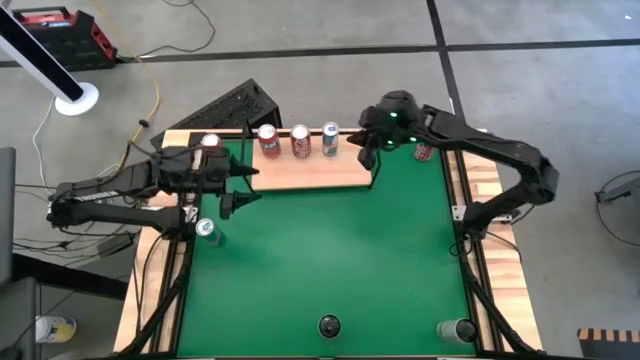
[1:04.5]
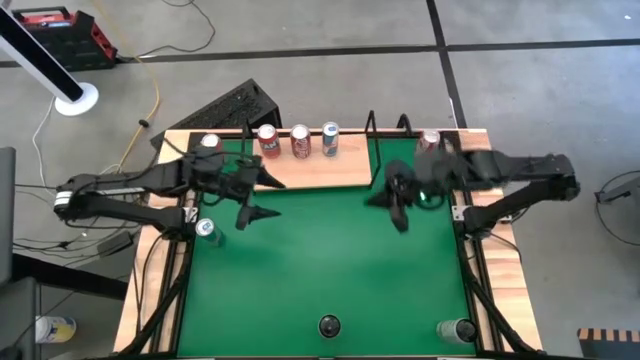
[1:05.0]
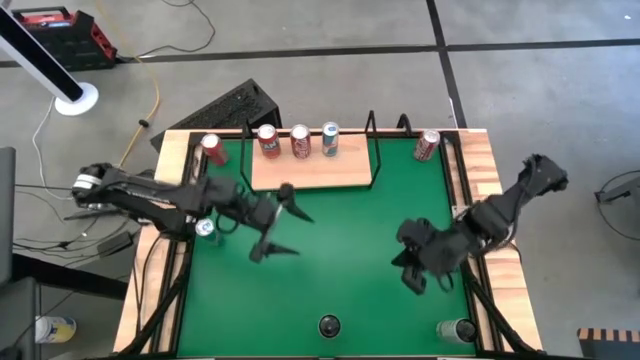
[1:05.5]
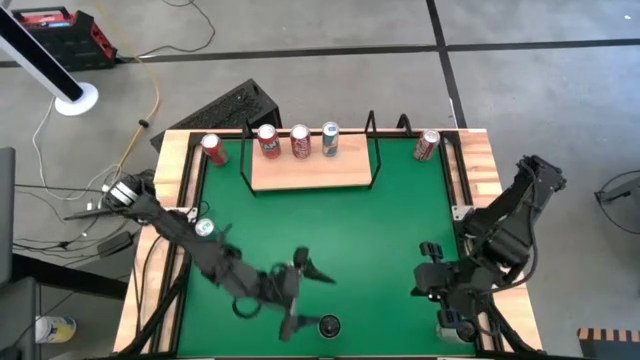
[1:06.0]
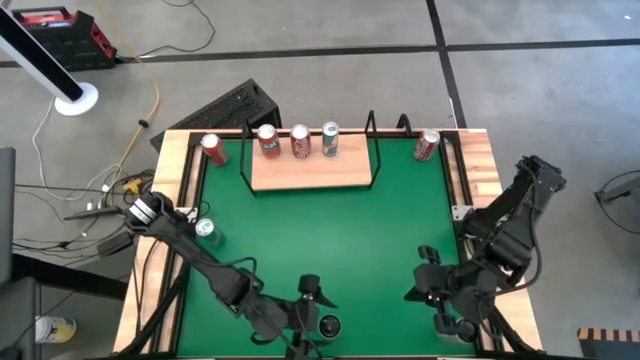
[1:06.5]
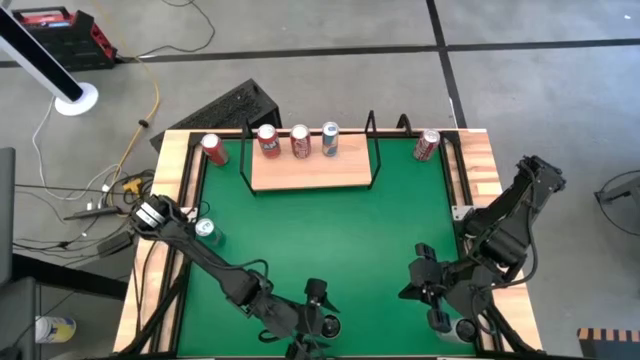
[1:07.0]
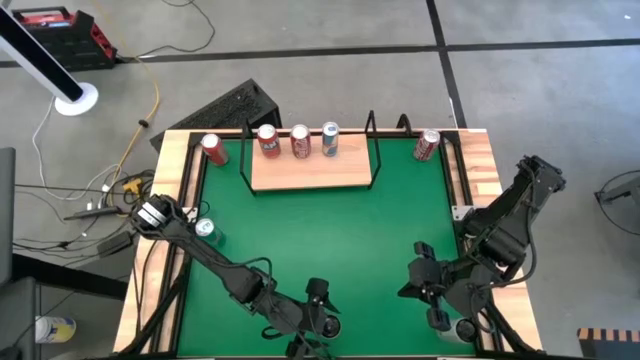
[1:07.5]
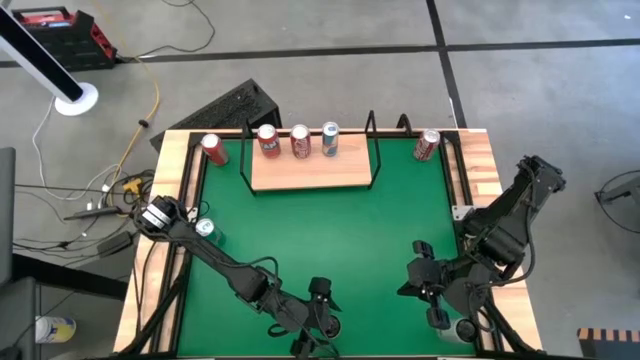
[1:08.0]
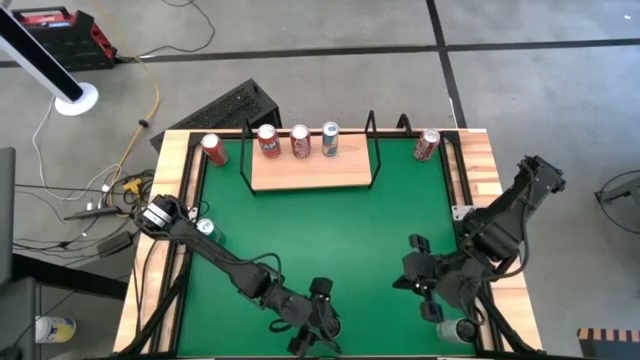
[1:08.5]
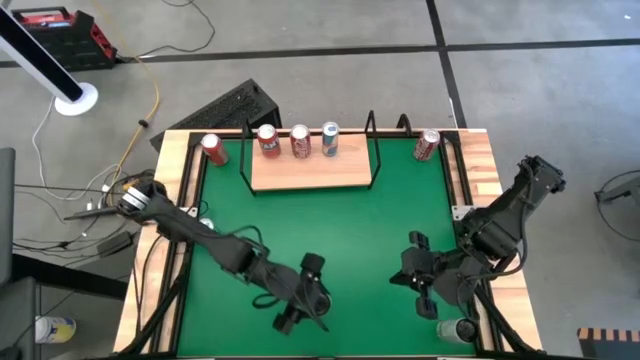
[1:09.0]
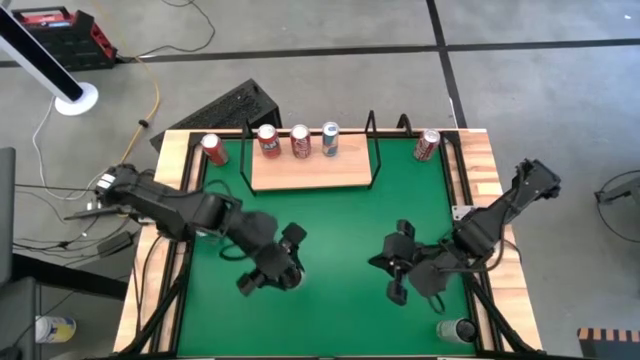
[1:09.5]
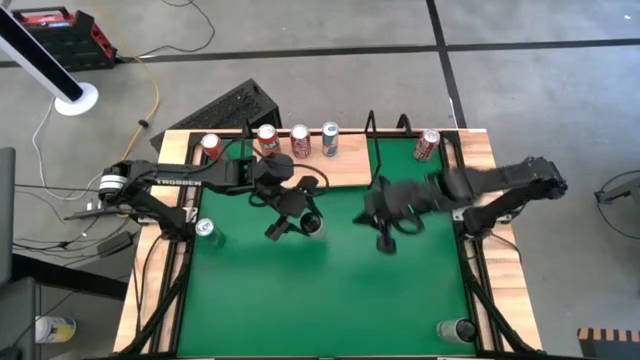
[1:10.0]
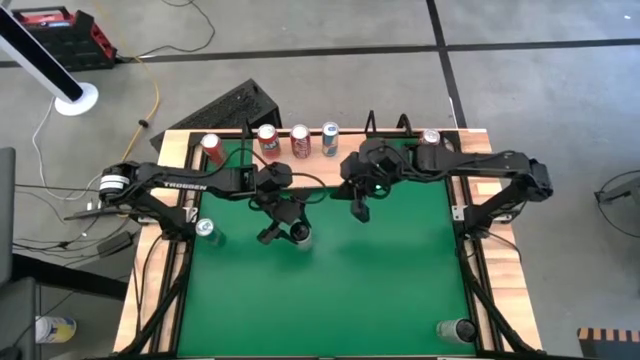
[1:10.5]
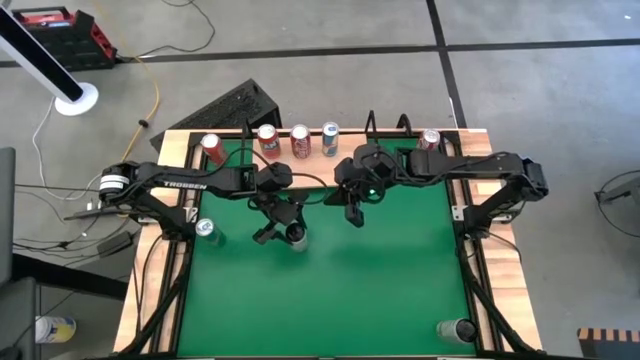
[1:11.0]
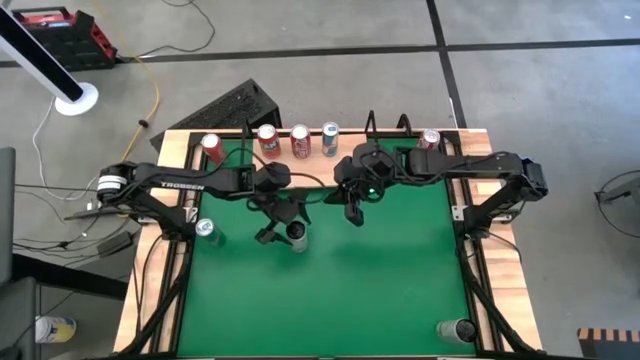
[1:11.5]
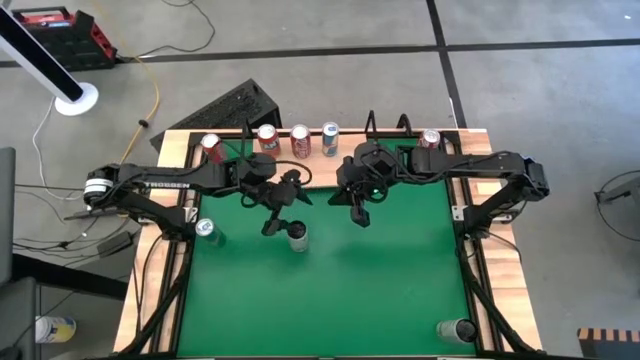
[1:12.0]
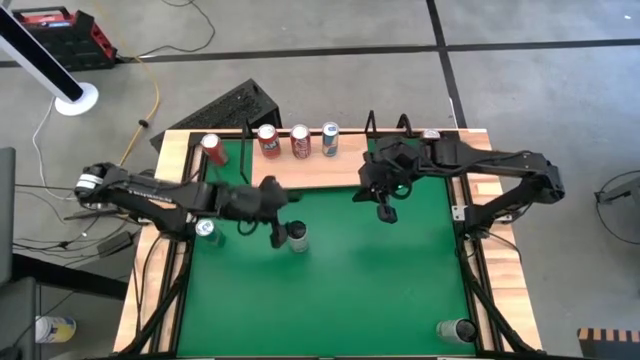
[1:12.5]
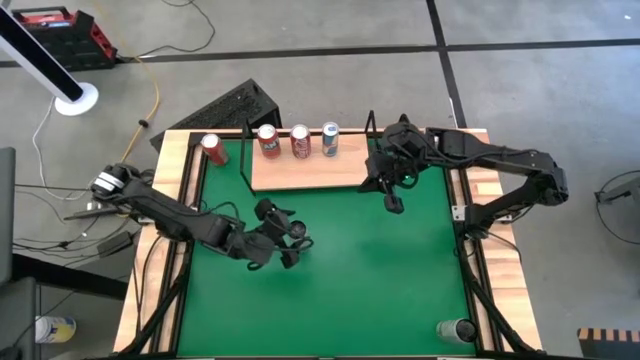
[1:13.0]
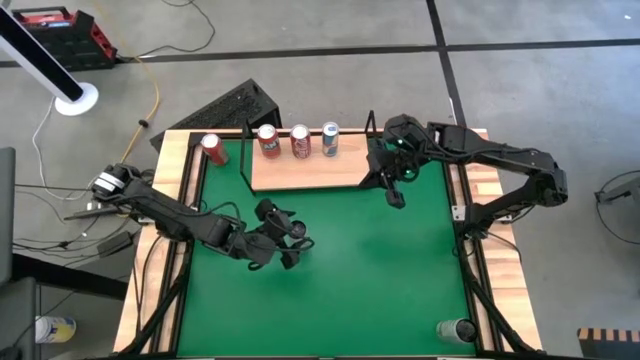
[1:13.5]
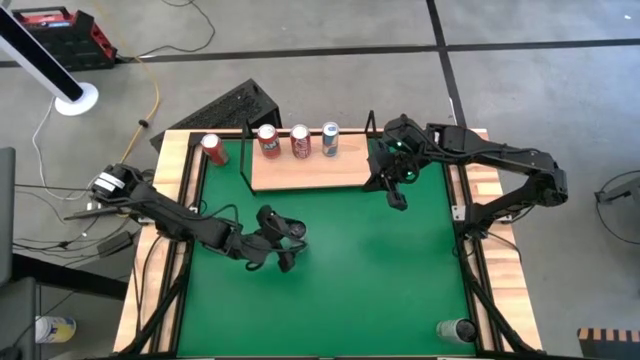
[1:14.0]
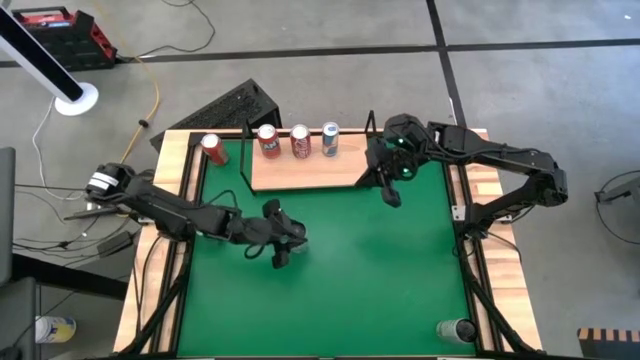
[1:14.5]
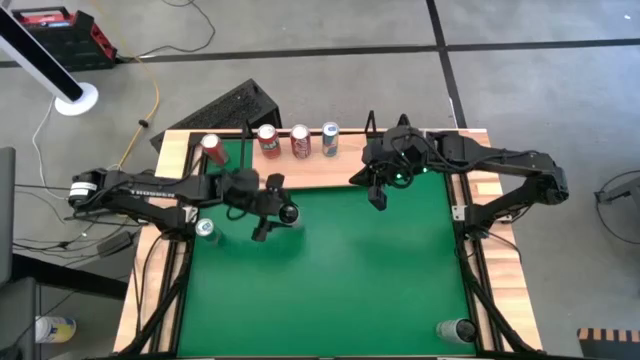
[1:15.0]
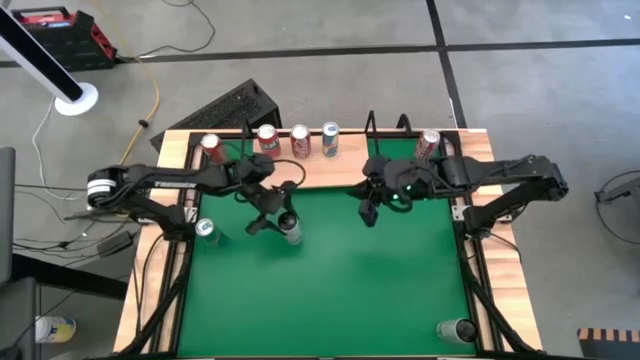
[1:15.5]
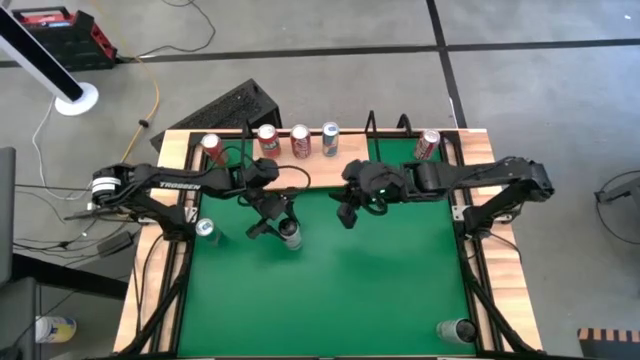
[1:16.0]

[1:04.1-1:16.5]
Task: Place canned beverage on shelf
Put the left white and yellow soda can on the shelf

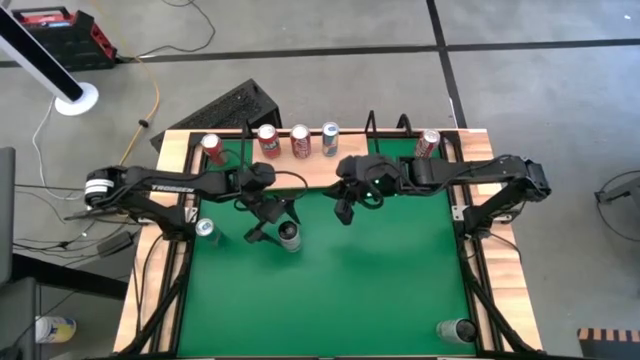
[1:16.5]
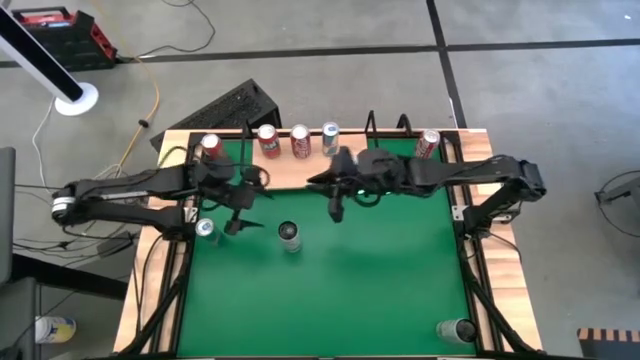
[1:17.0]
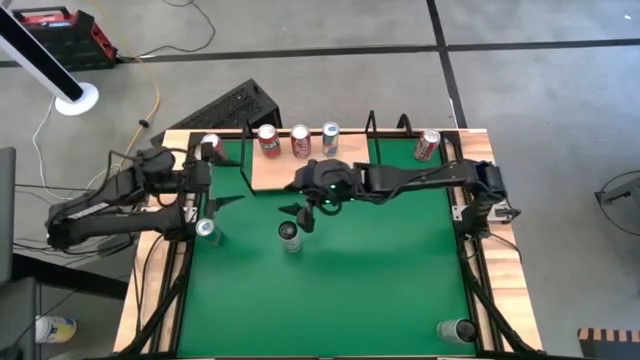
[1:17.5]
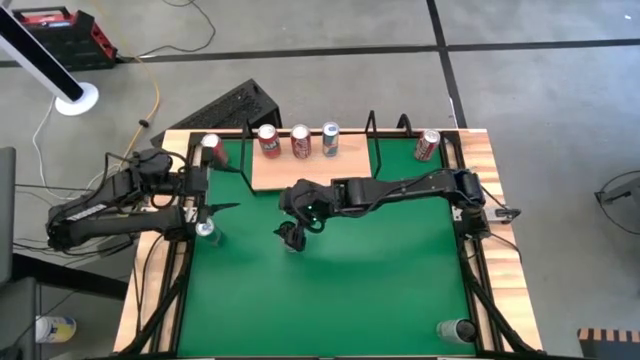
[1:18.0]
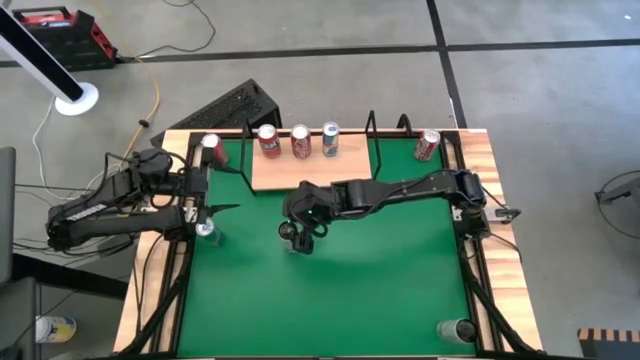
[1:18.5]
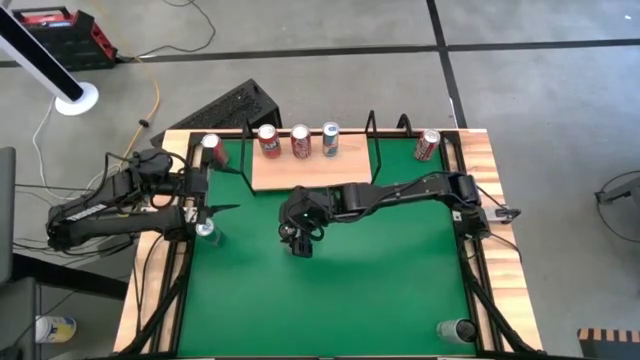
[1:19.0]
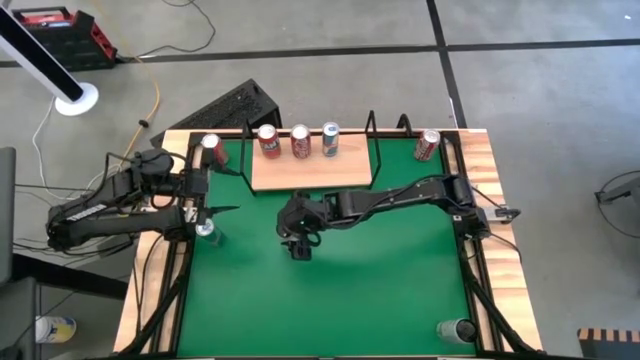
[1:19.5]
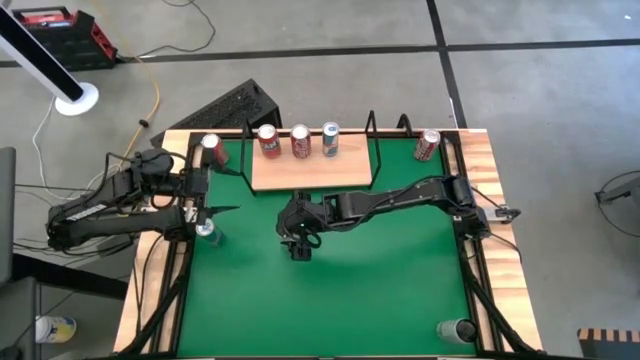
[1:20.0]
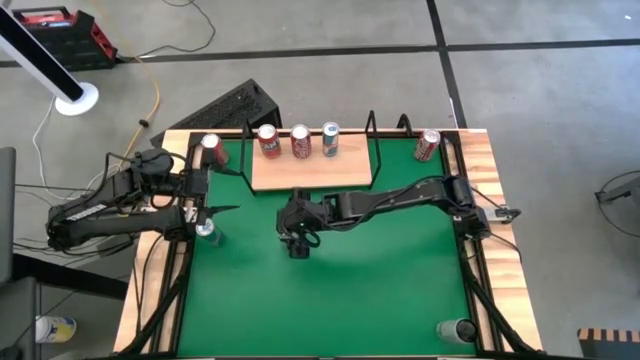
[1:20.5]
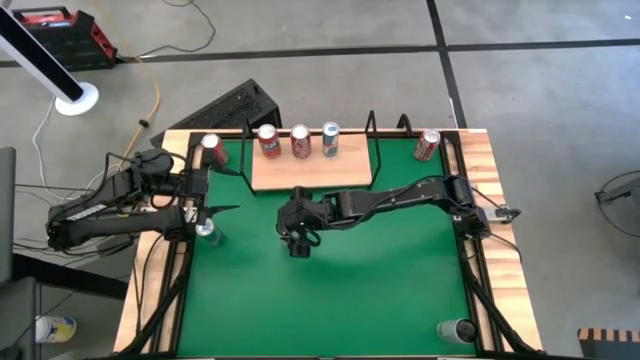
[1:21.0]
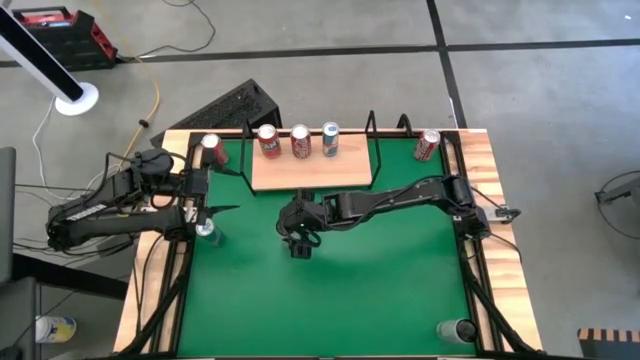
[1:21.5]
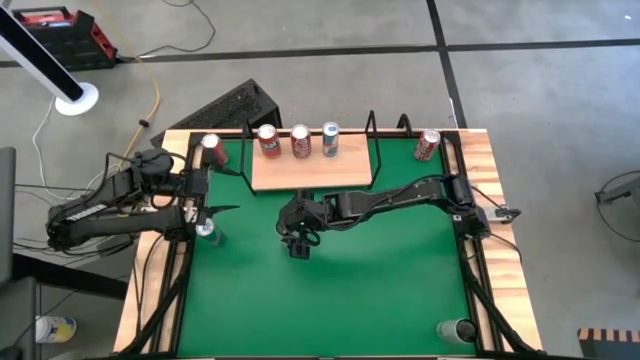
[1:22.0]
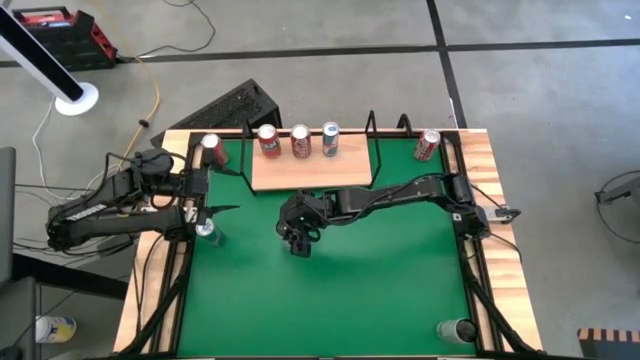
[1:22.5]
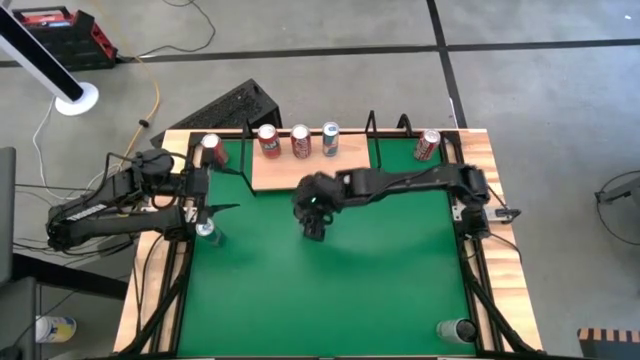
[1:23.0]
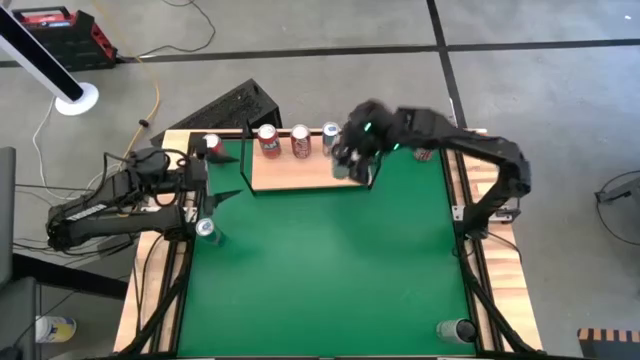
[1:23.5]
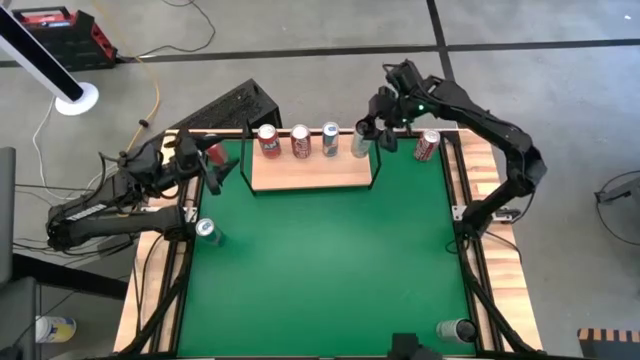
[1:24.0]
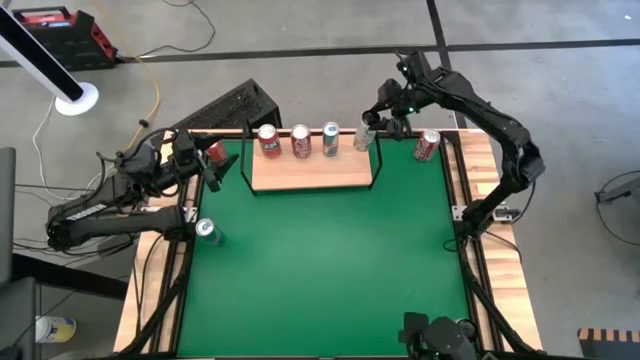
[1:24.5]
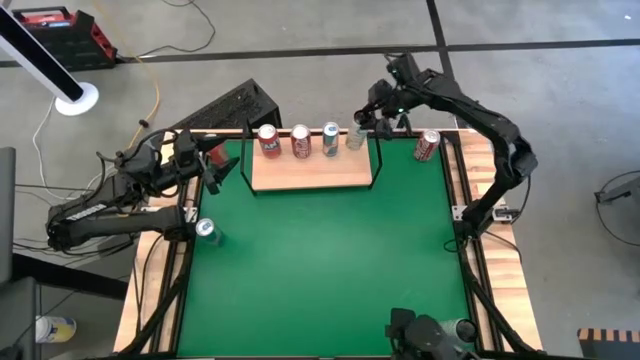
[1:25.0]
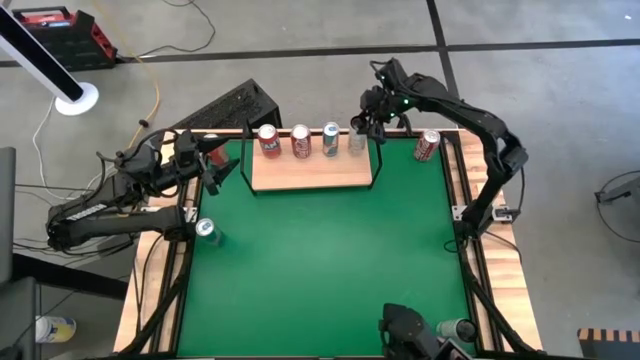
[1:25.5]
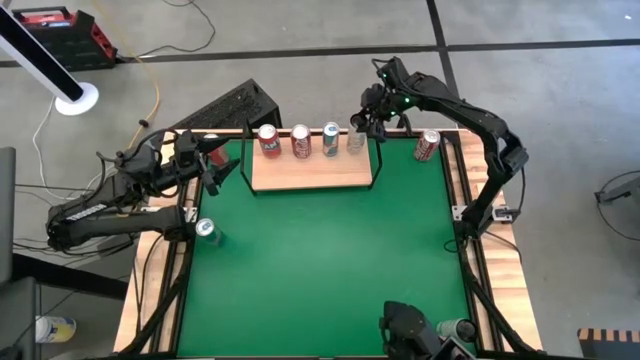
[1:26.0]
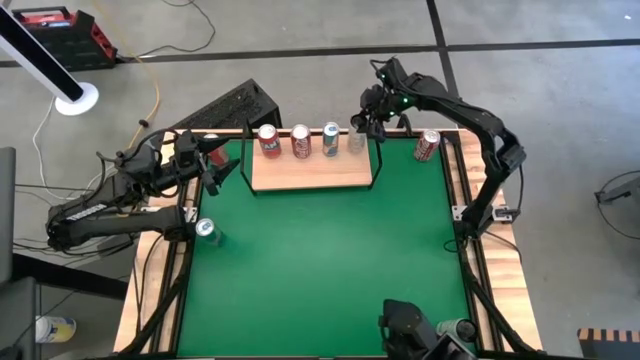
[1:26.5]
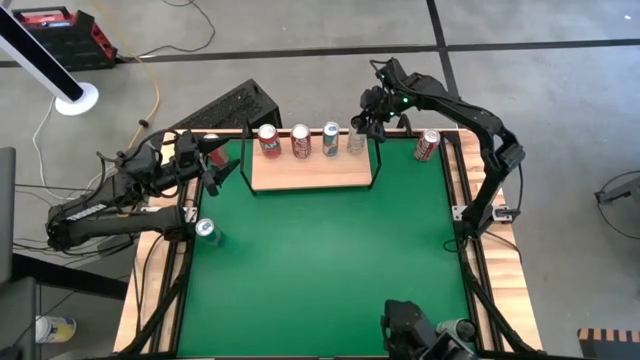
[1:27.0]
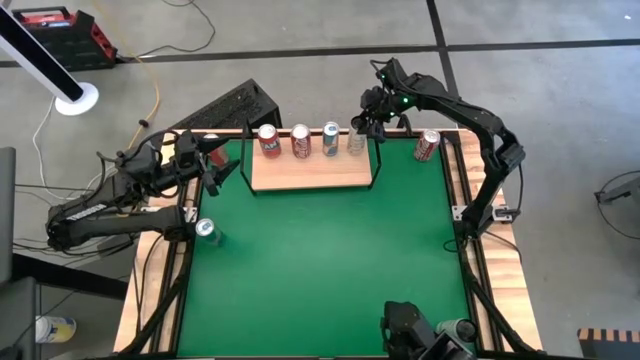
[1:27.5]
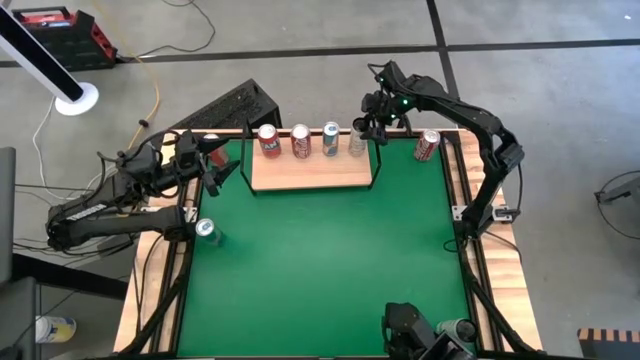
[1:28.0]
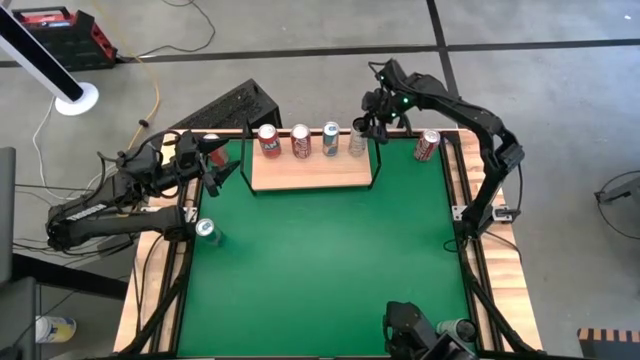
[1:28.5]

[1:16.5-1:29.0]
Put the left white and yellow soda can on the shelf
